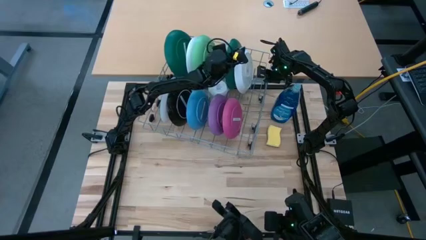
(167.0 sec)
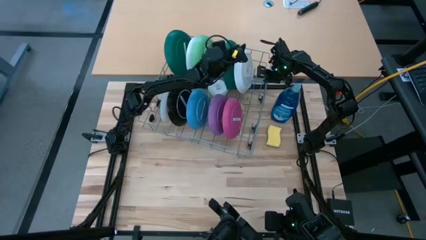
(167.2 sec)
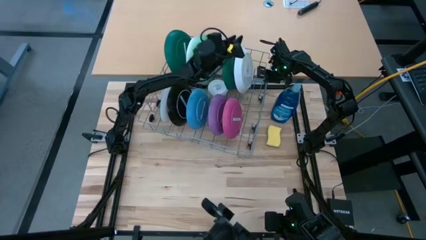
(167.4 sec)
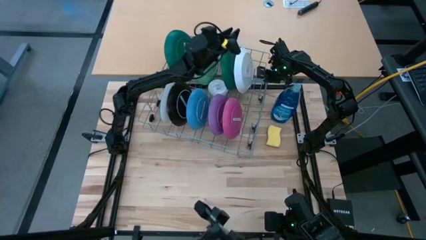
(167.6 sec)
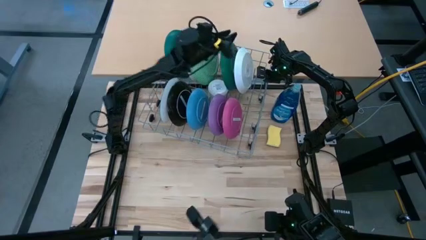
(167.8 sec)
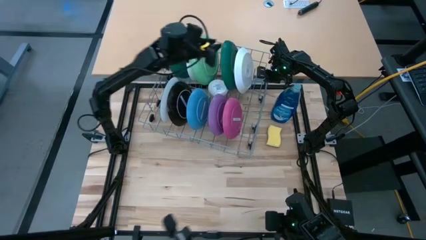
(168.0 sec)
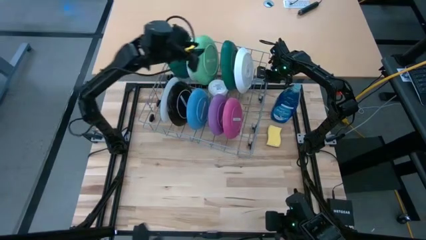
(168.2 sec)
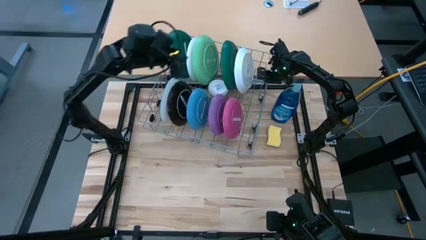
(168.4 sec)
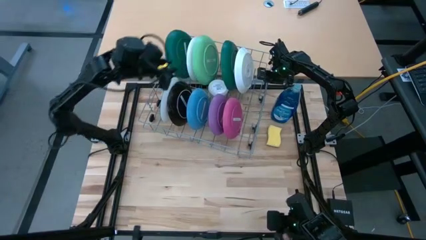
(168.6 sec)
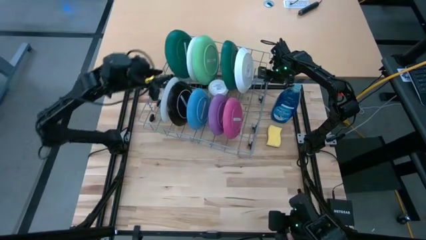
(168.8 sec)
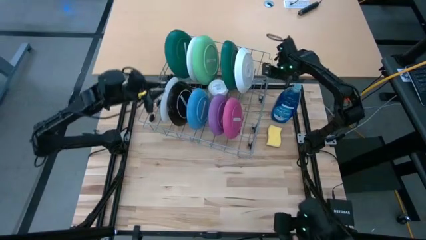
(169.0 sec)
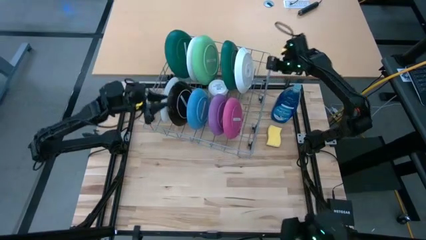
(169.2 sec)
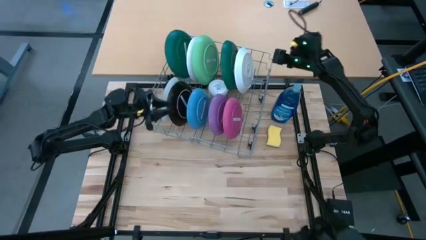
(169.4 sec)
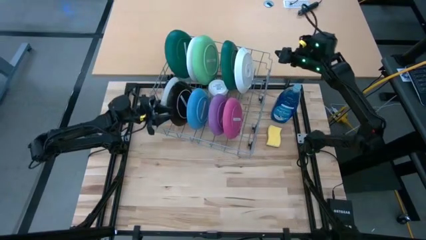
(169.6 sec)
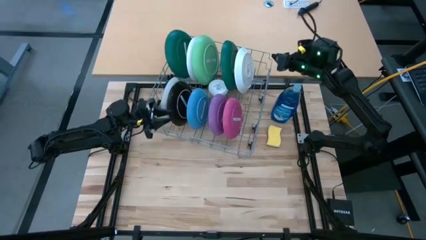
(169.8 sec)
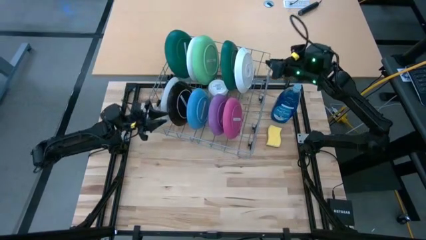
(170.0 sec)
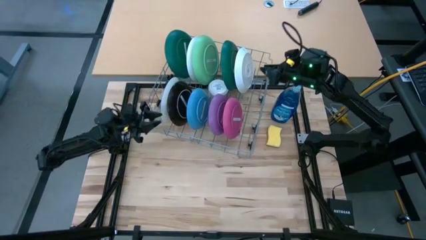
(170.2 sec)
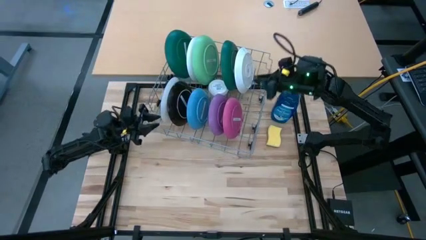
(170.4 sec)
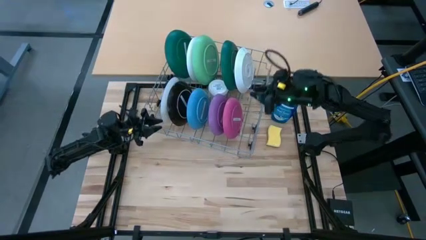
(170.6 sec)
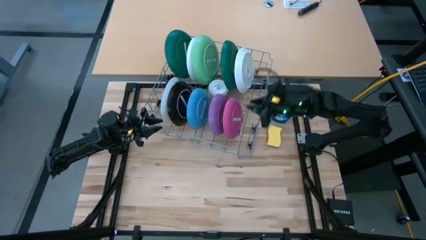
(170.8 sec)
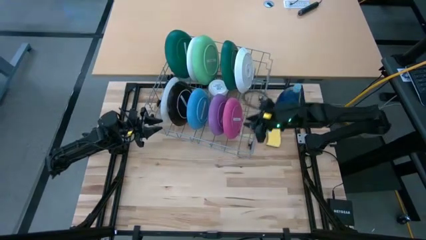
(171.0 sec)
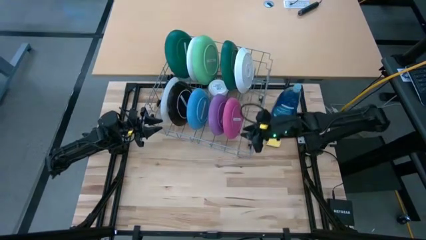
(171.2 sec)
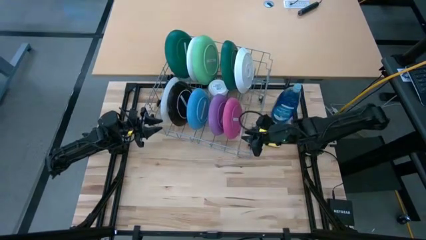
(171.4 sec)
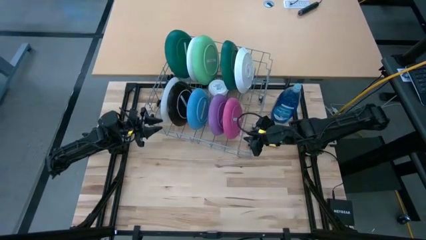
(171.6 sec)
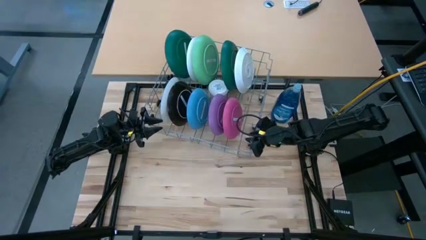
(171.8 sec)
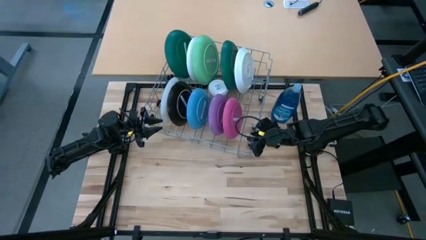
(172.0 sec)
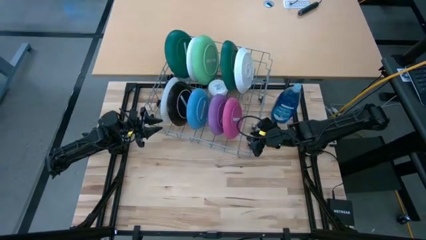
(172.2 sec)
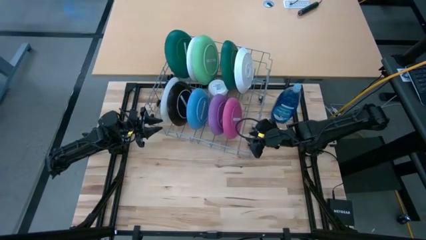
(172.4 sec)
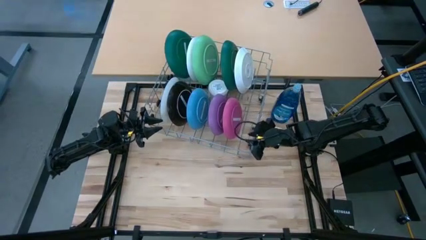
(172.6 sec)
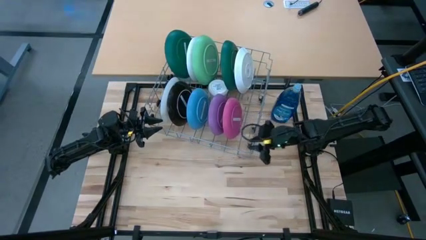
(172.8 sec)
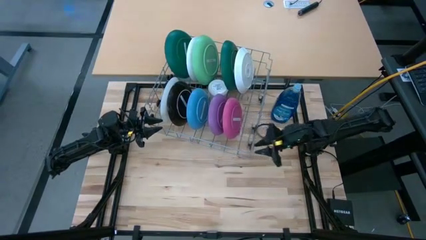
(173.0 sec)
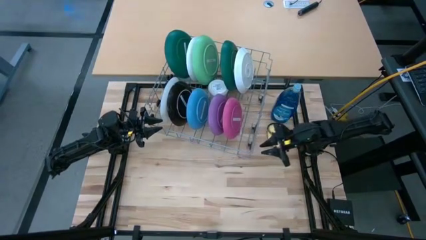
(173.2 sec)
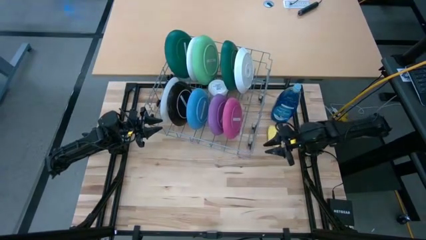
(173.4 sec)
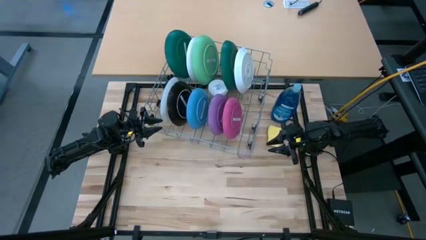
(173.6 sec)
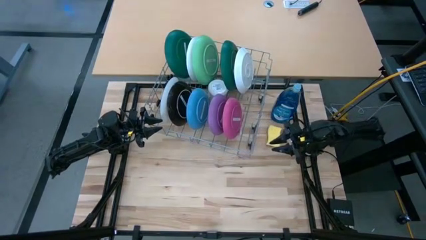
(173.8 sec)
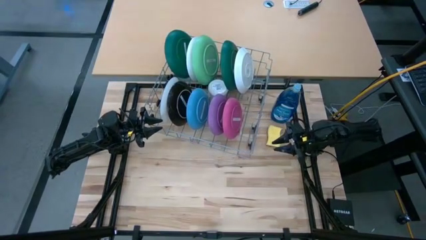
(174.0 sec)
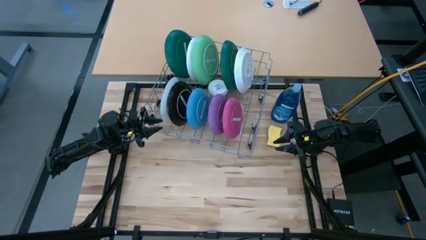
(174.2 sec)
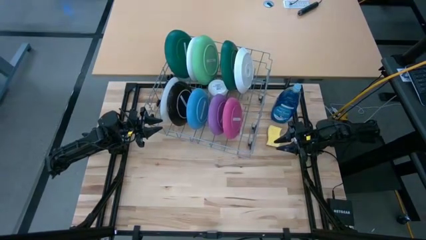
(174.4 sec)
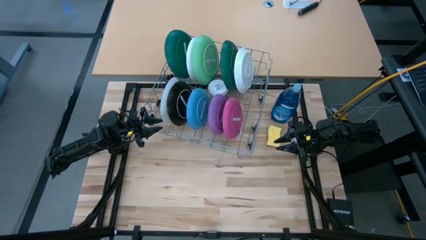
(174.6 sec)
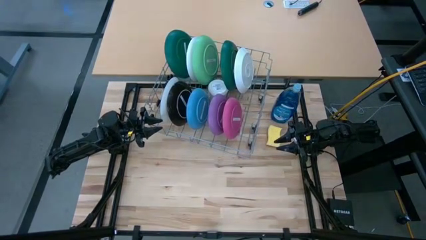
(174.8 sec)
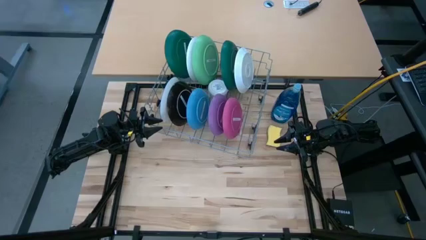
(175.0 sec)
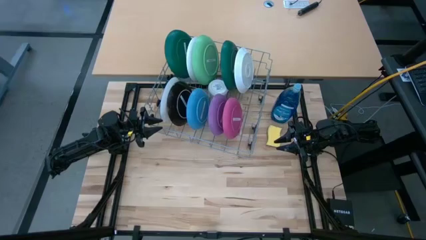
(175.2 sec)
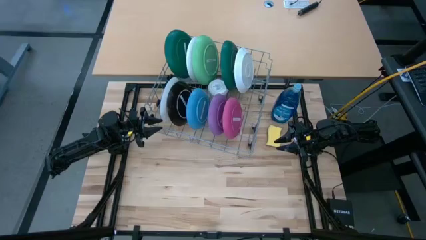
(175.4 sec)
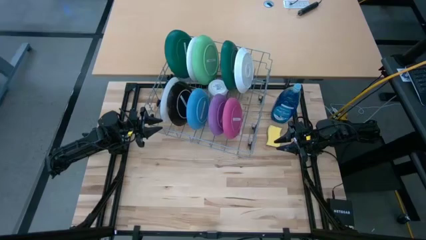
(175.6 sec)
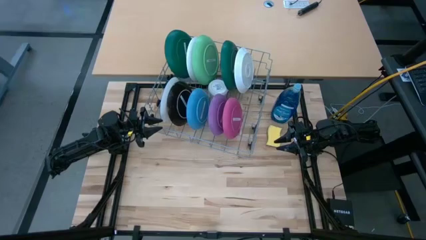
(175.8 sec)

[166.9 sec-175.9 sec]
Task: Sort dishes
Return to Home Position

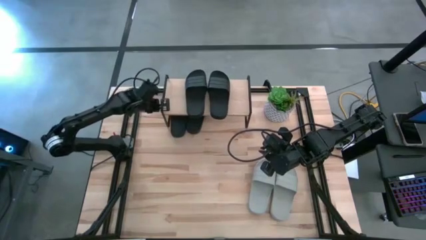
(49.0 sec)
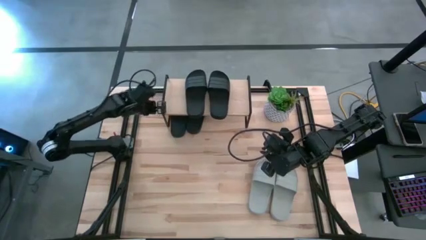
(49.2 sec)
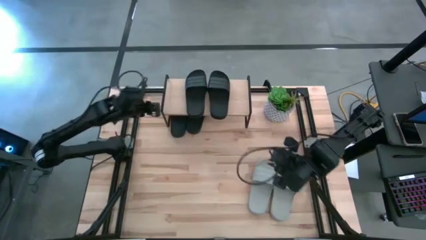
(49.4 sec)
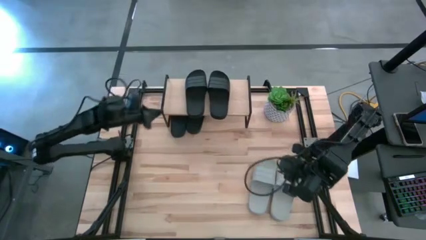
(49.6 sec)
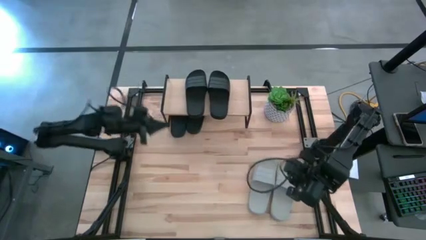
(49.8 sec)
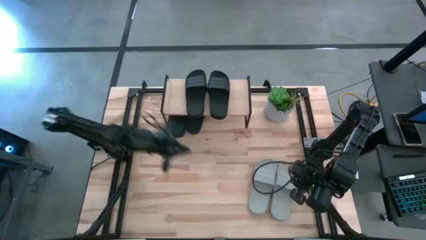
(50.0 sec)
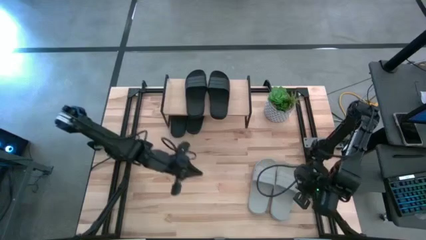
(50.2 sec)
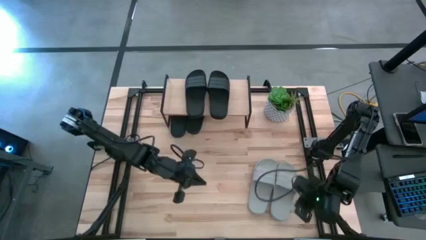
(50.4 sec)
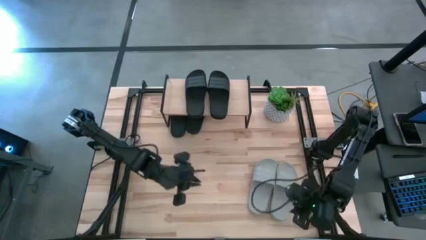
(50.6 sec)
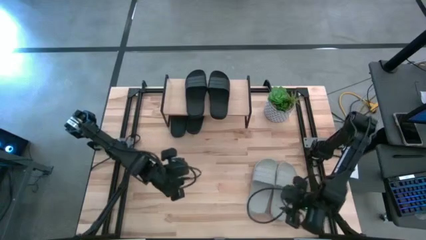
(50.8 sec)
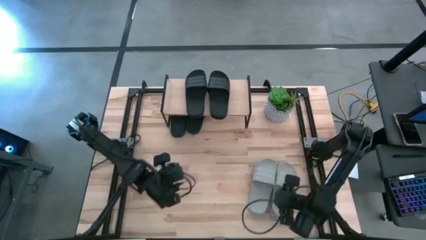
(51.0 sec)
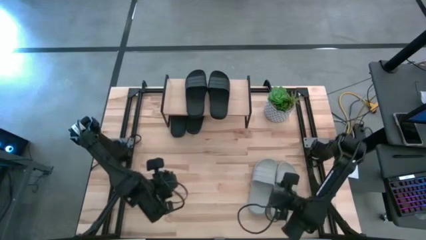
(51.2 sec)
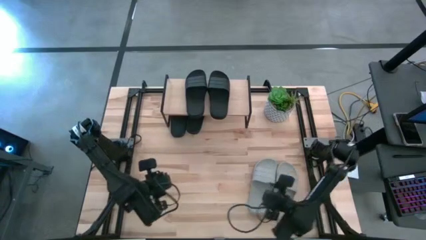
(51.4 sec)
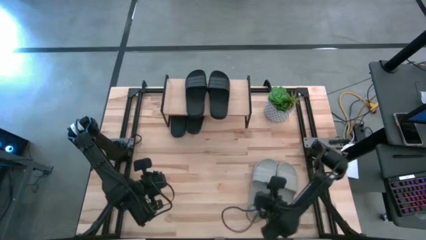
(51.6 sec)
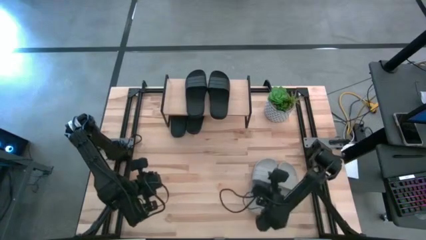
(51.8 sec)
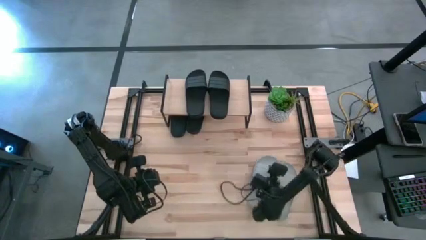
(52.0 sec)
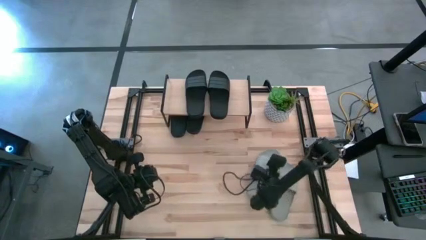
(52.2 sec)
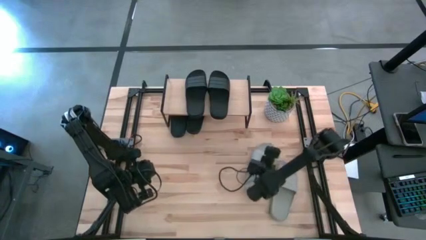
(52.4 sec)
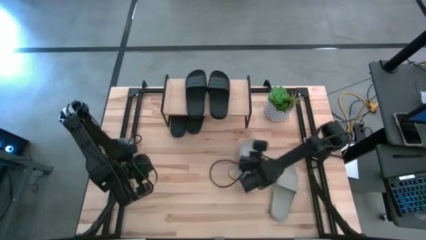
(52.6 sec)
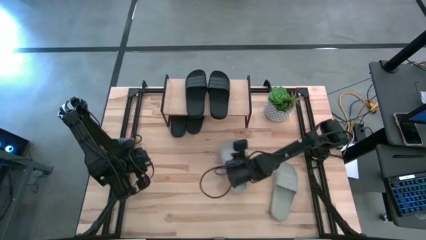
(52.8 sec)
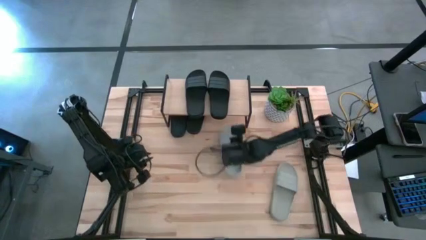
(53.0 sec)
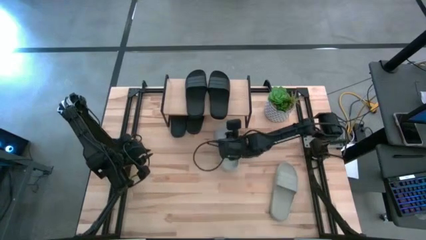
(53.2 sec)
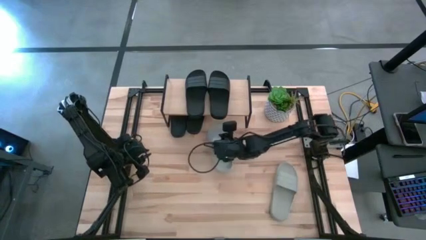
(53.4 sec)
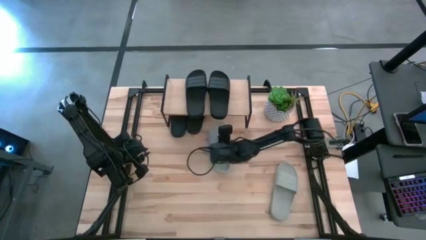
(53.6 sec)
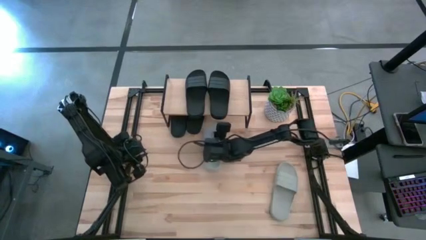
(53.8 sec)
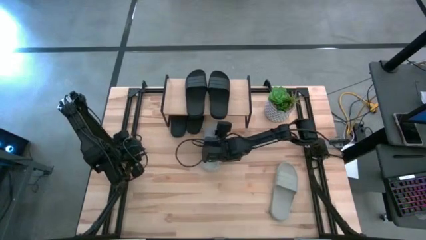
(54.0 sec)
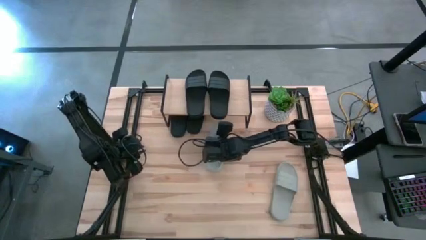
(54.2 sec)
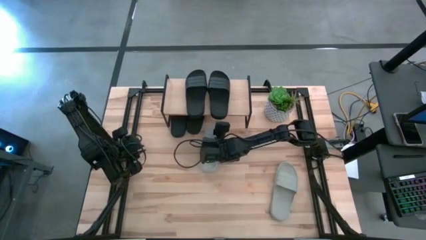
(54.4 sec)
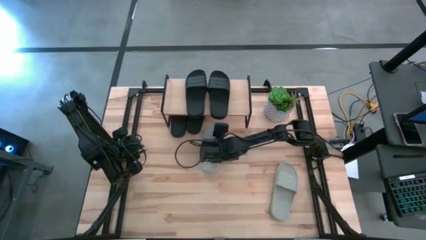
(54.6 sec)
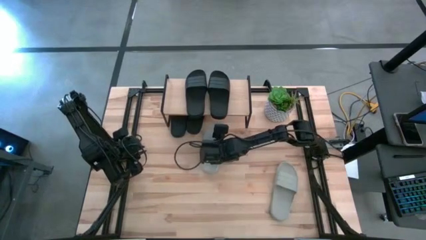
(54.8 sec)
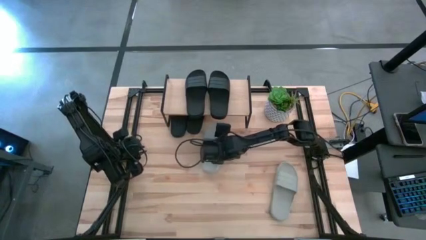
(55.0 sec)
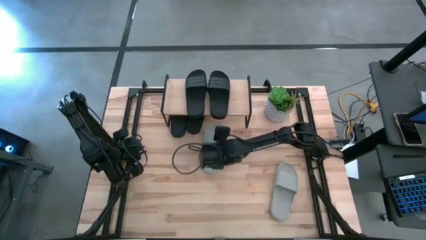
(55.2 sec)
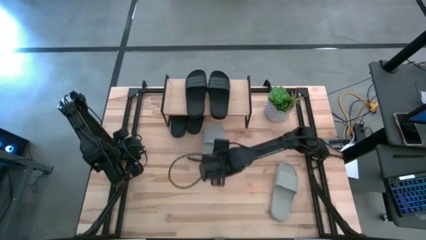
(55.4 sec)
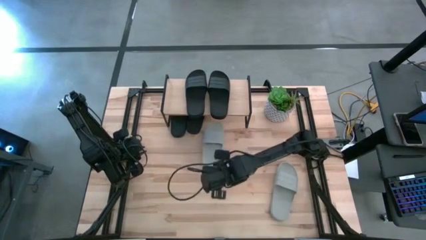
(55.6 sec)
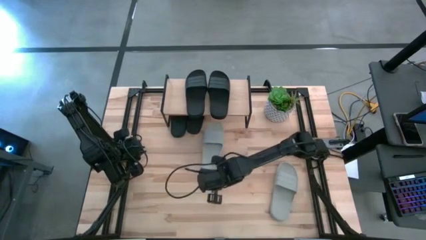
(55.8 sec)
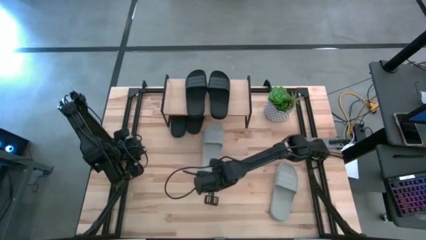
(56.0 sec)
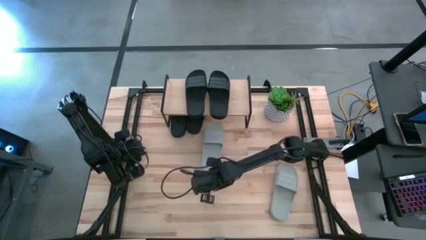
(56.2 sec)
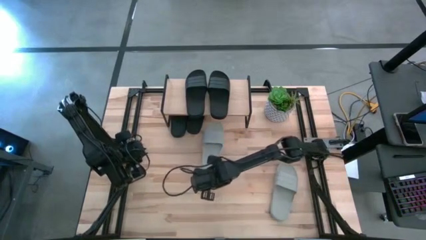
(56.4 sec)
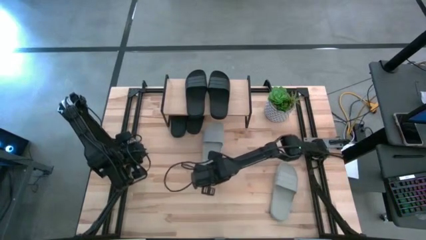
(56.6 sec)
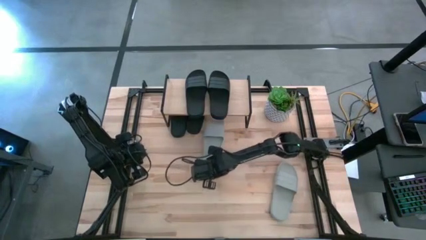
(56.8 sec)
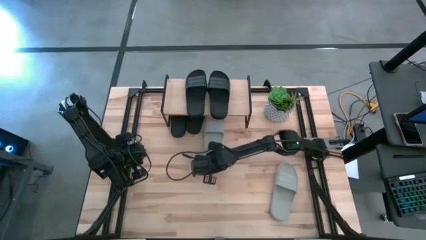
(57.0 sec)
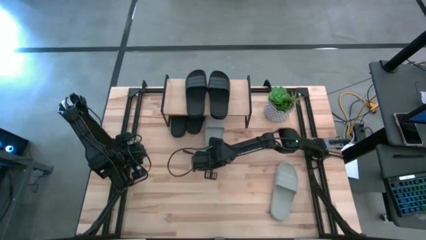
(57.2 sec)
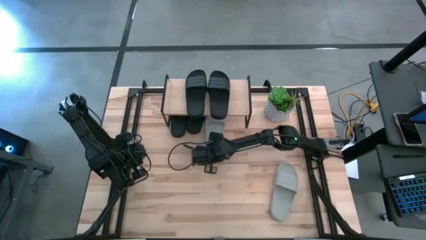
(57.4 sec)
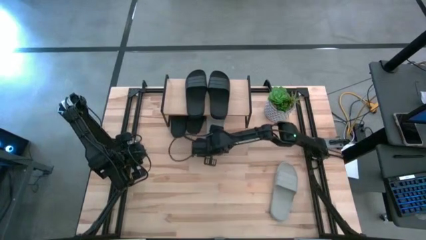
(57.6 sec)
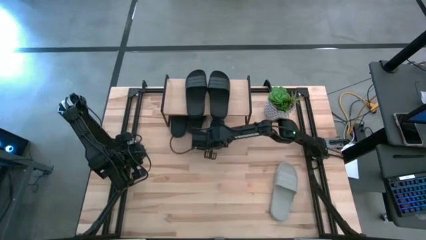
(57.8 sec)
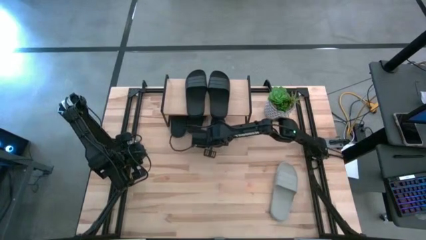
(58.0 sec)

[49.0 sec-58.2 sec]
Task: Pick and place slides into the shelf
Put the gray slide under the shelf
